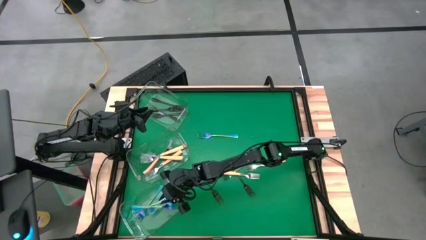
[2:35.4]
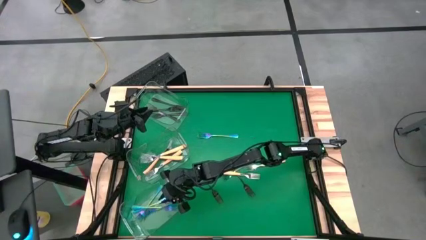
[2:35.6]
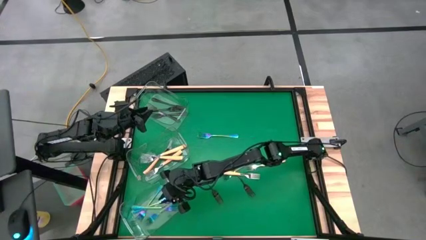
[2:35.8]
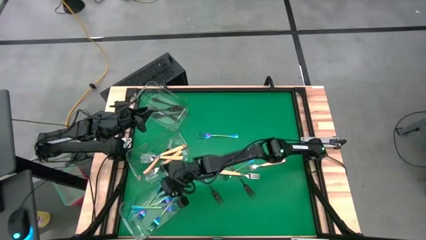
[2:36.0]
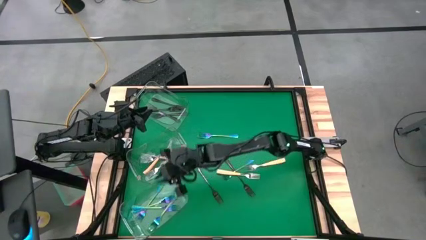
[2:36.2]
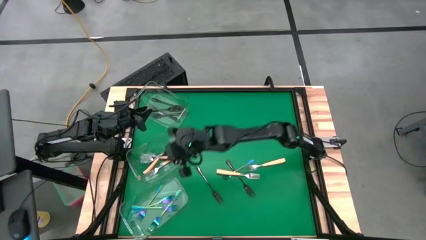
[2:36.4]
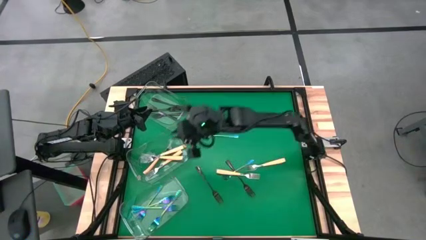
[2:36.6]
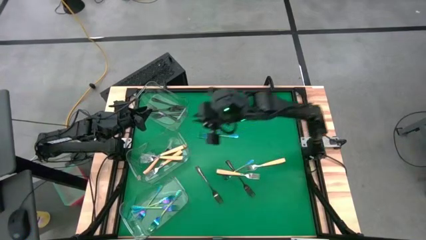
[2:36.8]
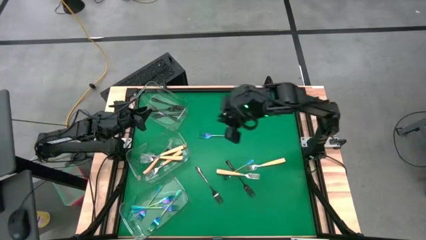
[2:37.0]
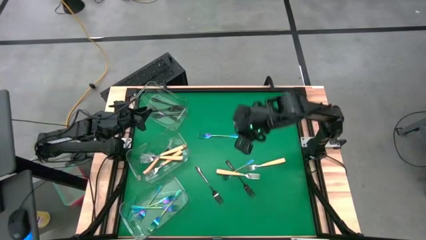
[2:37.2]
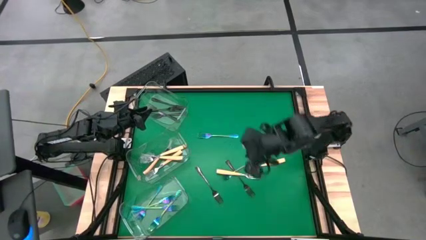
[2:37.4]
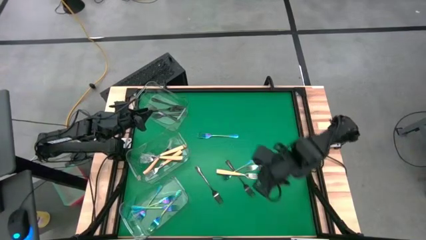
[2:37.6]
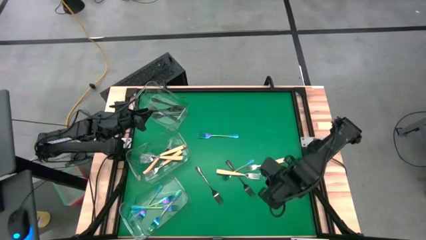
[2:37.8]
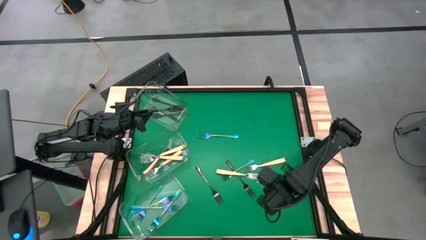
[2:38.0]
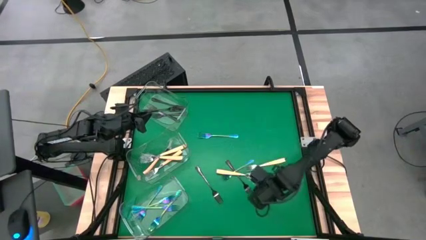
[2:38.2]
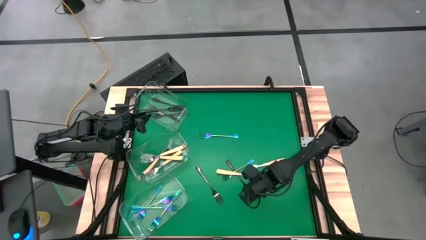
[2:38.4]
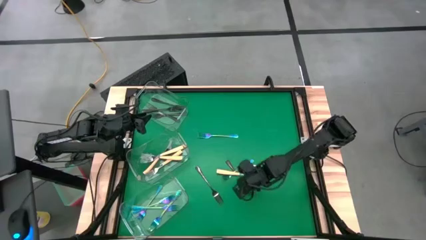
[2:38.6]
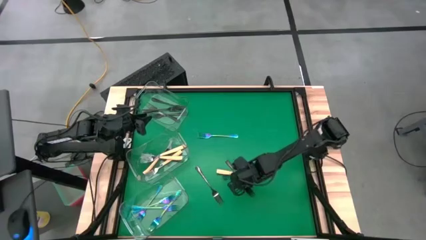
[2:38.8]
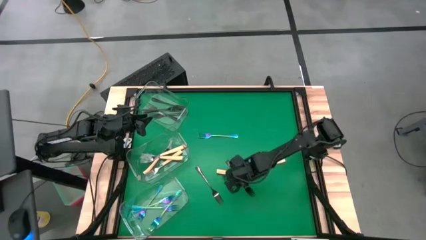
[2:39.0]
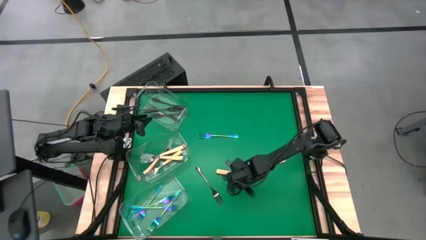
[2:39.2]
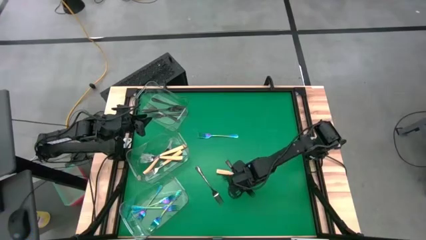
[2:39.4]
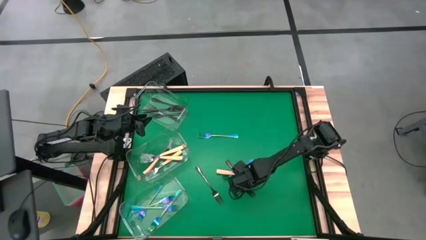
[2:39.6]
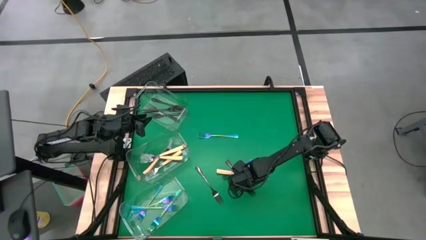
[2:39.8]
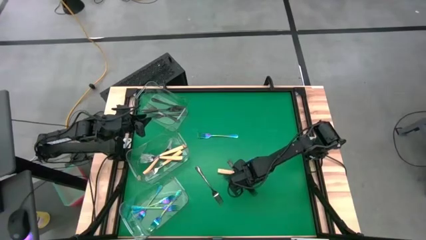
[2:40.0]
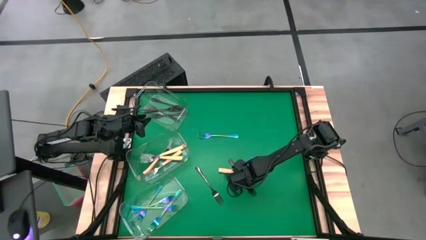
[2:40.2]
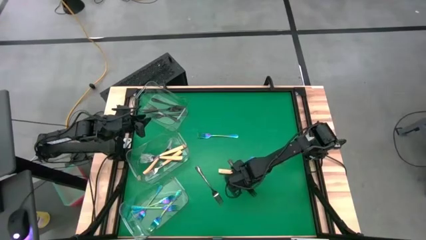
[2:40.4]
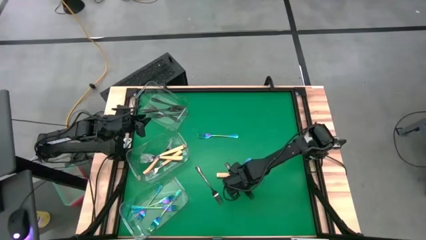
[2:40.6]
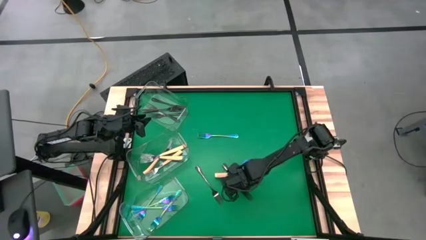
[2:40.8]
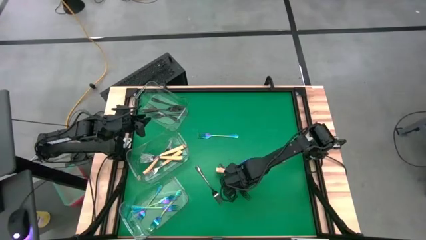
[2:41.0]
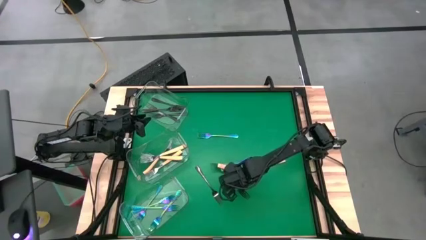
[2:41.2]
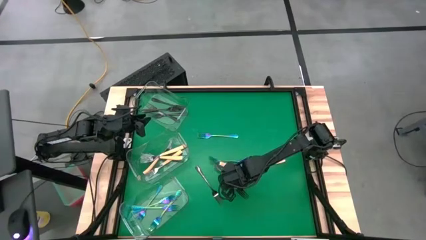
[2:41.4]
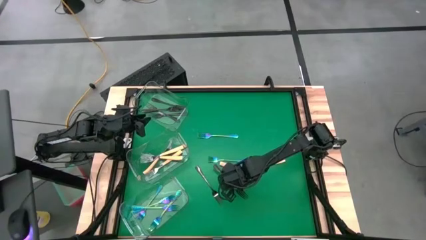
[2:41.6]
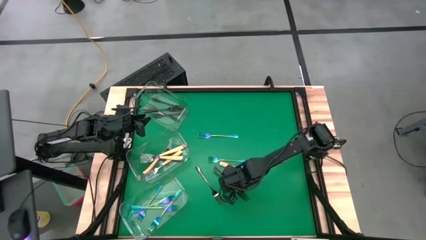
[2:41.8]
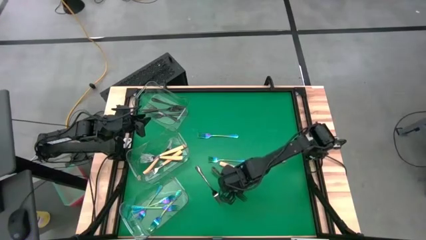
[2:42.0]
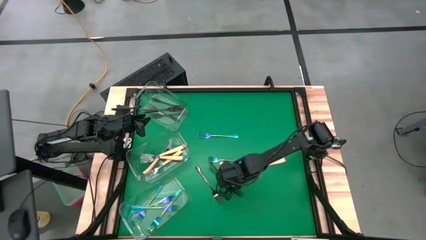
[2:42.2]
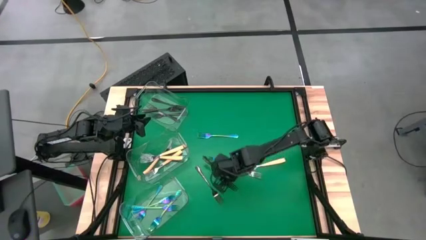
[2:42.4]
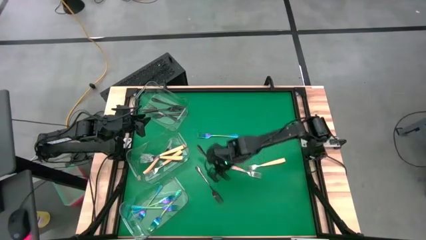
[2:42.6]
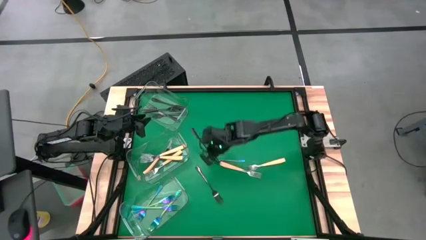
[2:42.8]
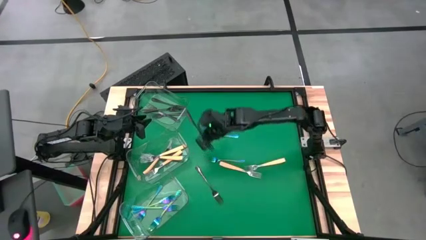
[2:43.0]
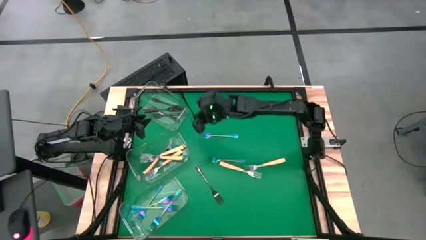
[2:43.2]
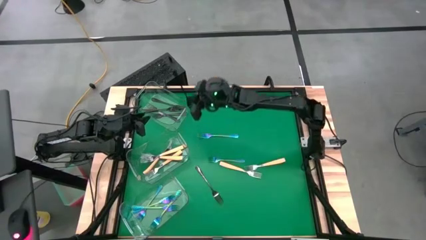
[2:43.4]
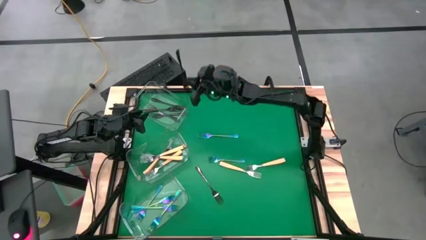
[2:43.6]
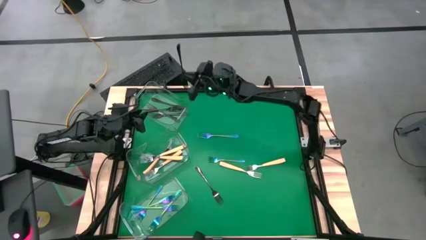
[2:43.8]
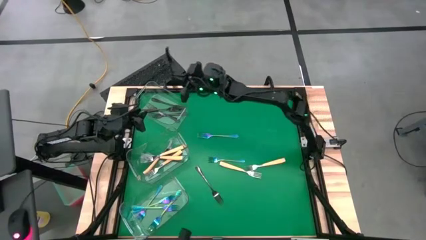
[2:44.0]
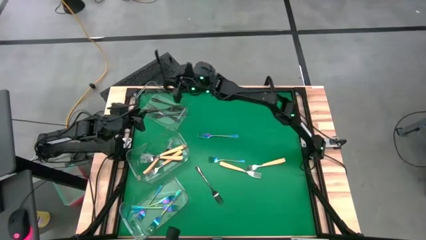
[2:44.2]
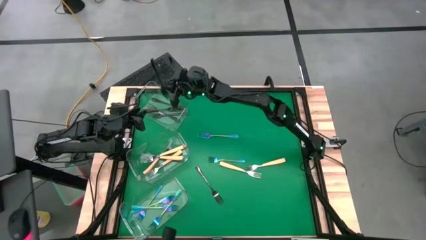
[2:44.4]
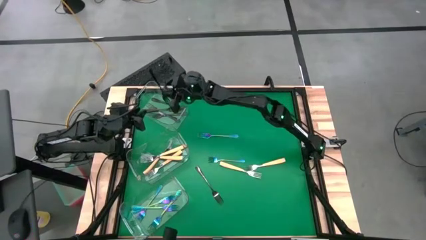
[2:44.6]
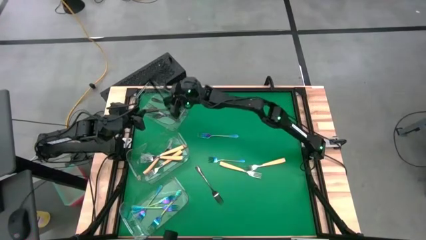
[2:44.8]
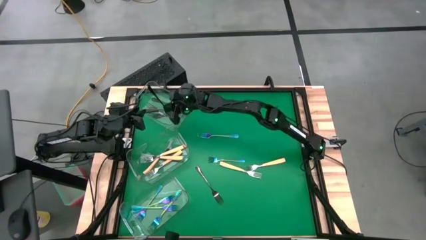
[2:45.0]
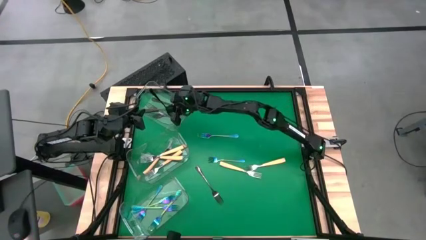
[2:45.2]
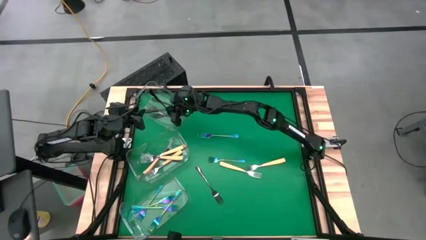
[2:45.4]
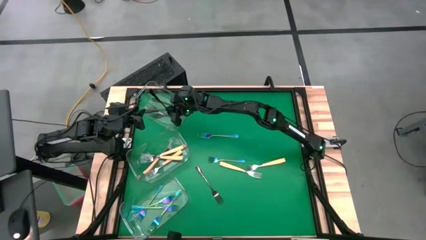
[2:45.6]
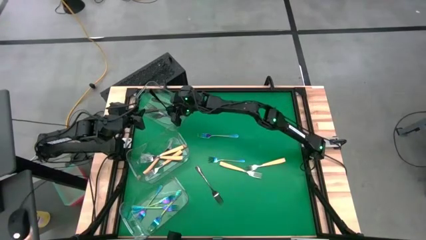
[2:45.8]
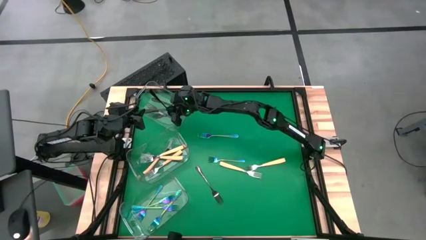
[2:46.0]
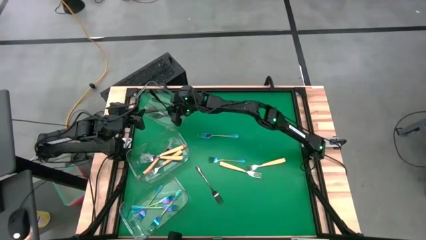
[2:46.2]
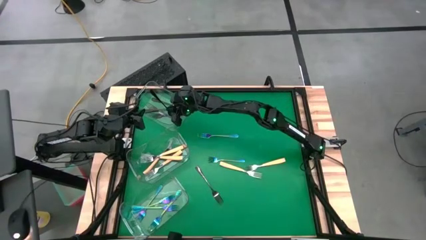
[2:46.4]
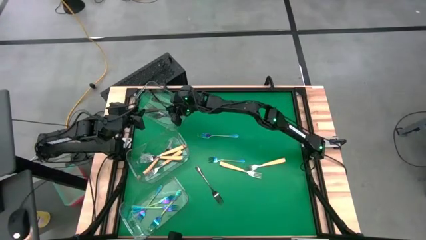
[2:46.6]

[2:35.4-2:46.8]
Task: Sort silverware by color (type)
Put the black fork into the top transparent bin

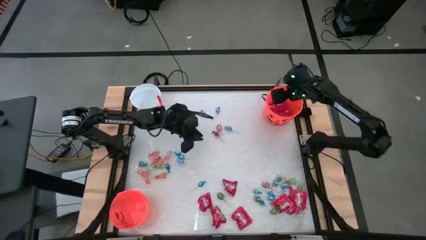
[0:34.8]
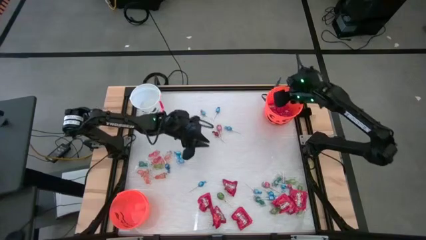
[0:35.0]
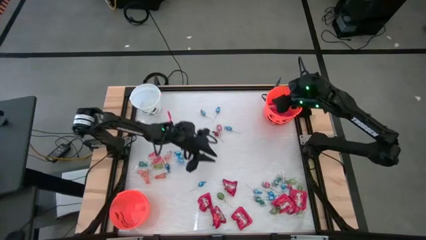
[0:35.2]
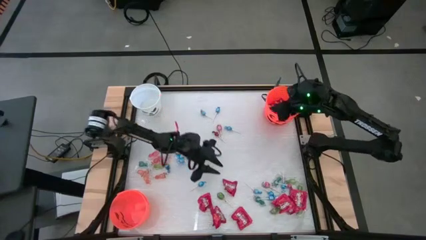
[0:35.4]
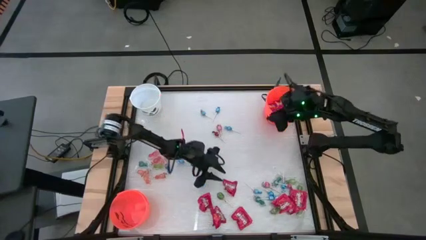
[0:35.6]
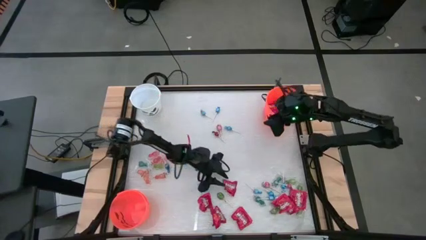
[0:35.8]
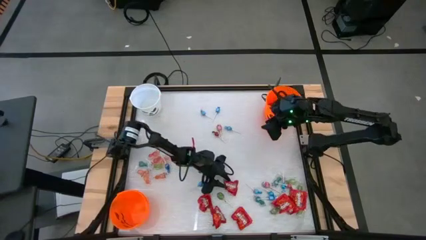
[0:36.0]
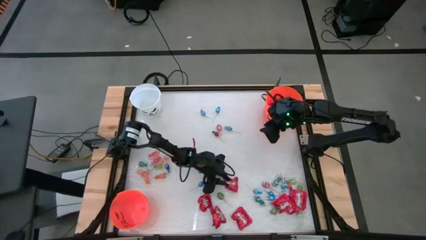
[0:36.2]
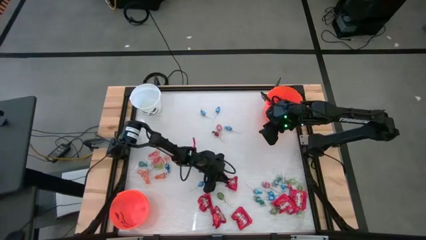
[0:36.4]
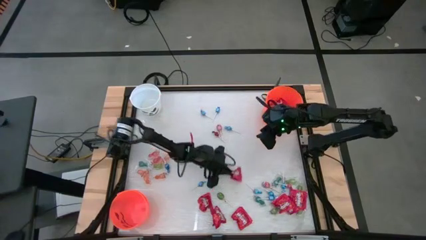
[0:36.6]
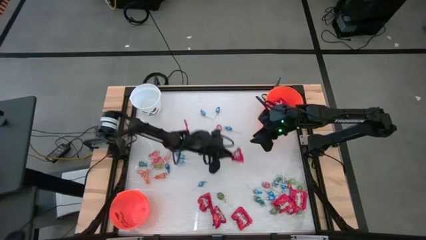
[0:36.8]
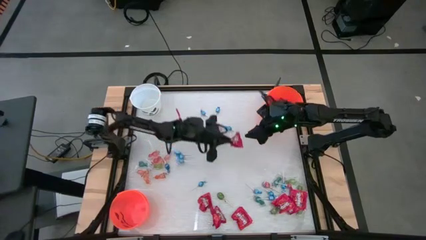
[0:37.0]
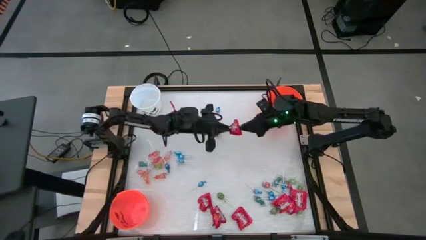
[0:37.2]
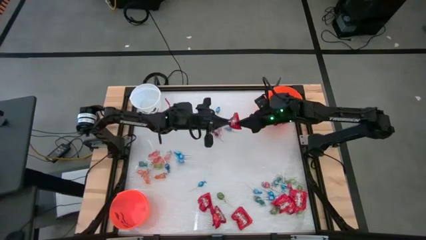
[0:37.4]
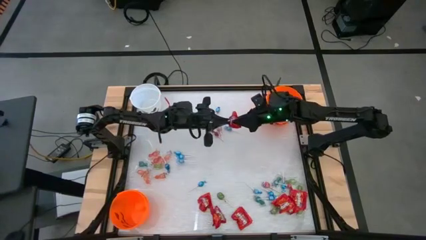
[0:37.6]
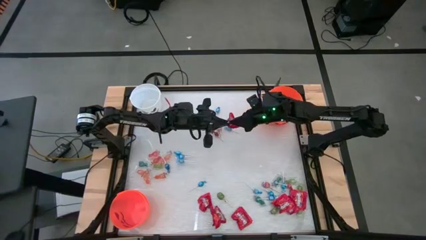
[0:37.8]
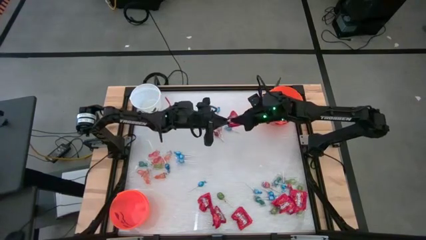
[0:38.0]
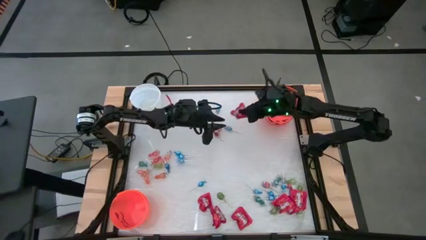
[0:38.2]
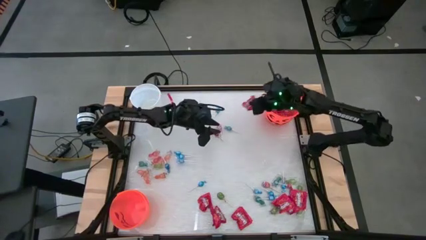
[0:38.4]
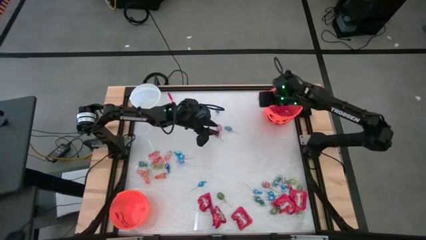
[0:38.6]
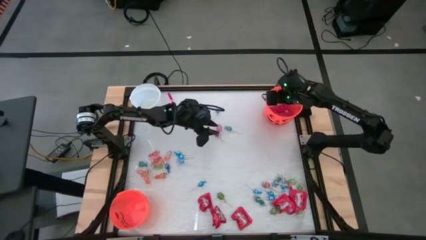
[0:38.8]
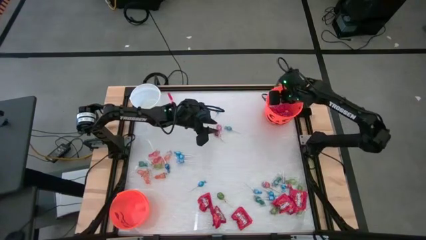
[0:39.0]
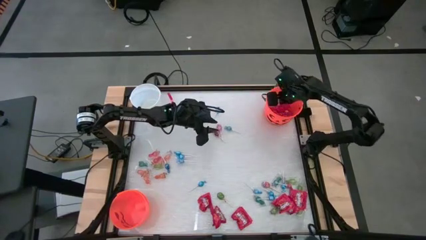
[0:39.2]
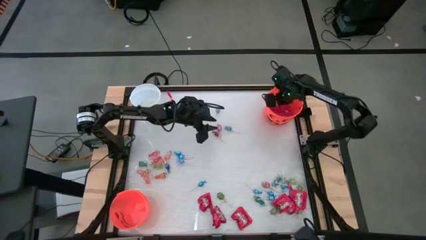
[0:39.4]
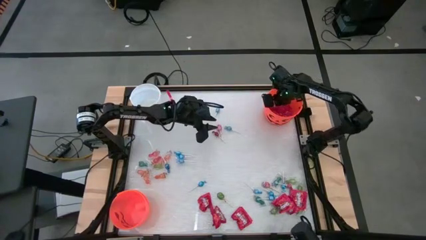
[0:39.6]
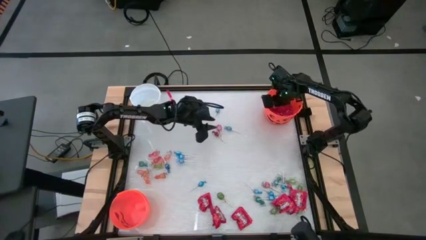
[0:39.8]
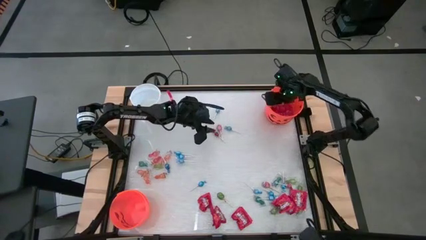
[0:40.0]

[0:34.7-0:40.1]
Task: Sort candy by brand, put in halloween buckets
Put the red candy into the top orange bucket
